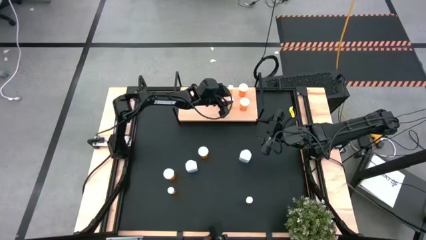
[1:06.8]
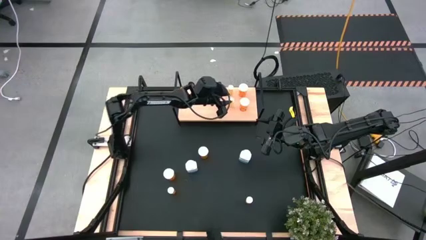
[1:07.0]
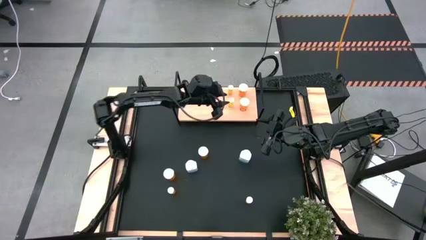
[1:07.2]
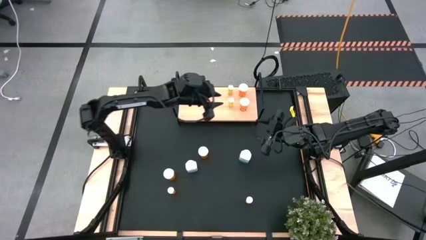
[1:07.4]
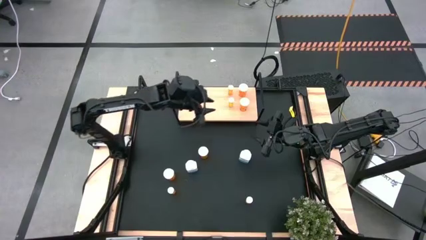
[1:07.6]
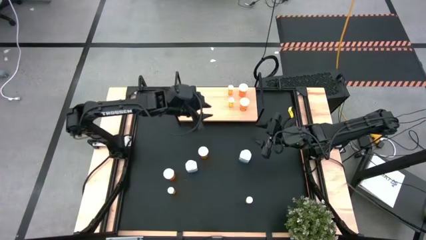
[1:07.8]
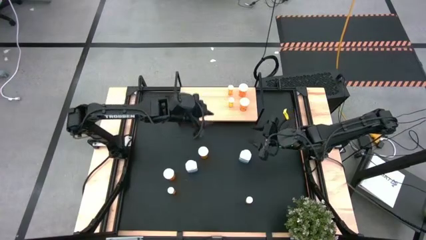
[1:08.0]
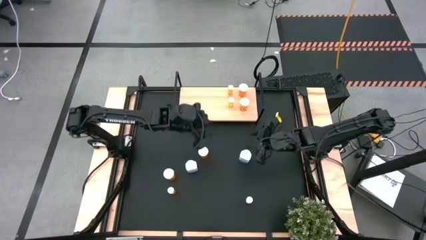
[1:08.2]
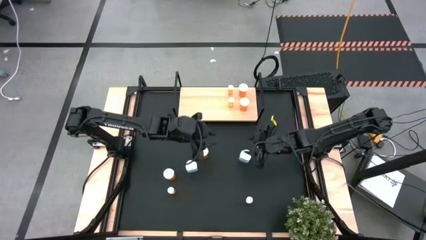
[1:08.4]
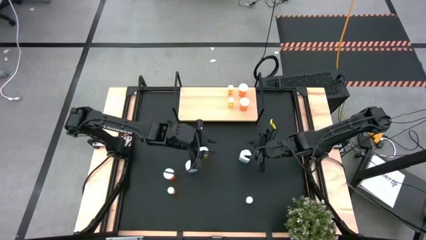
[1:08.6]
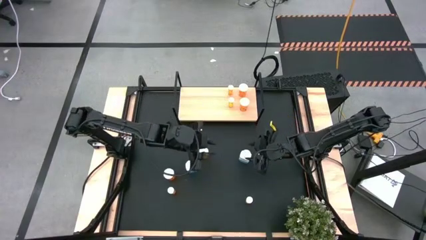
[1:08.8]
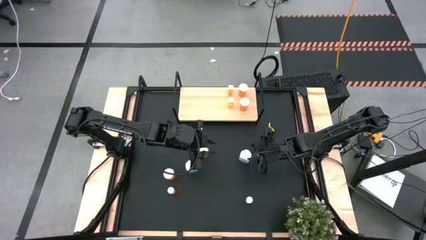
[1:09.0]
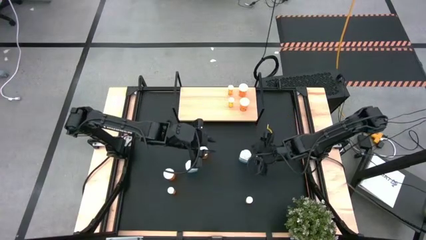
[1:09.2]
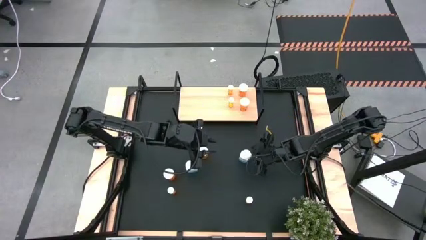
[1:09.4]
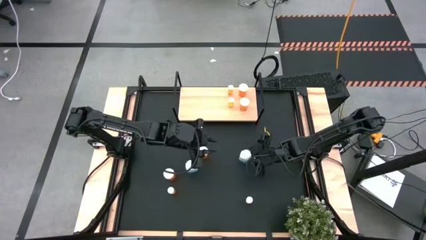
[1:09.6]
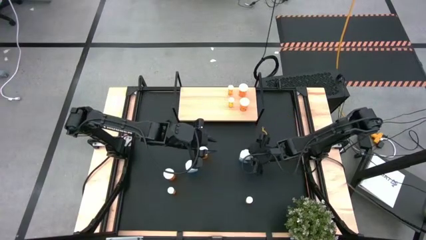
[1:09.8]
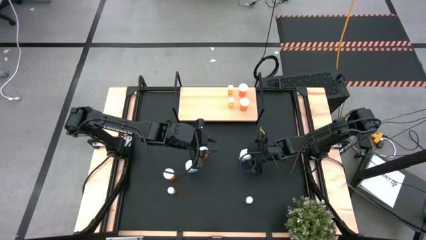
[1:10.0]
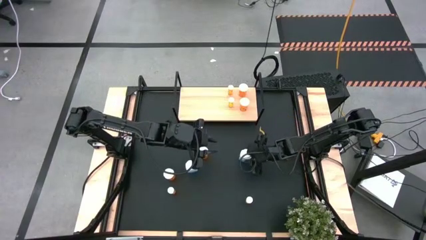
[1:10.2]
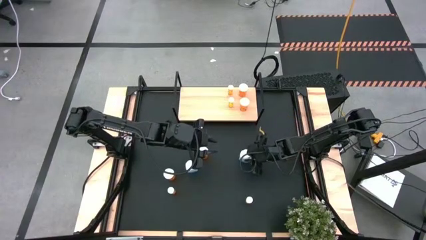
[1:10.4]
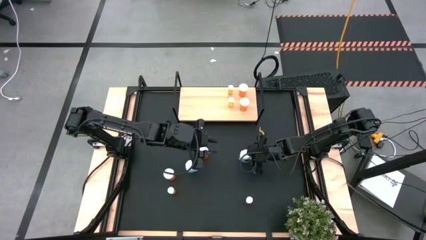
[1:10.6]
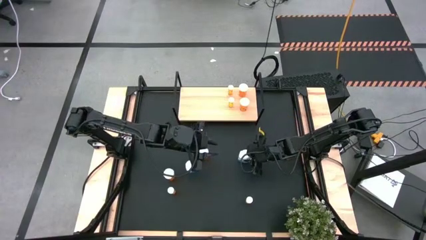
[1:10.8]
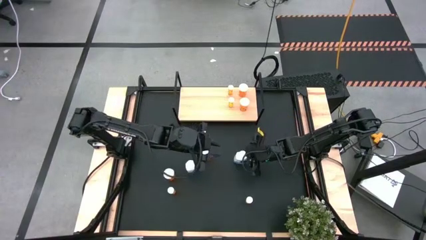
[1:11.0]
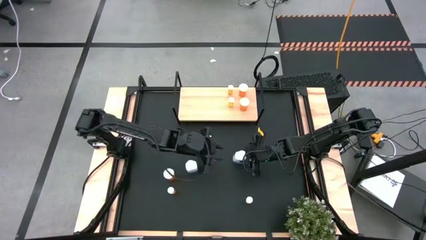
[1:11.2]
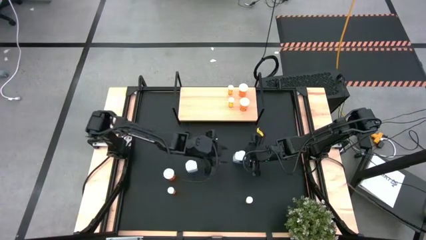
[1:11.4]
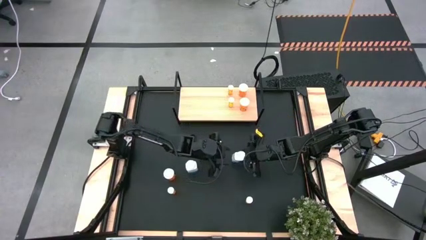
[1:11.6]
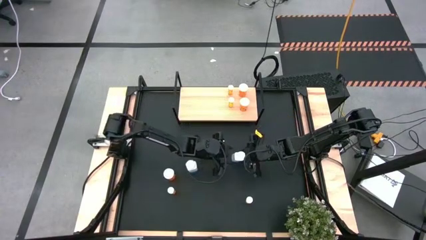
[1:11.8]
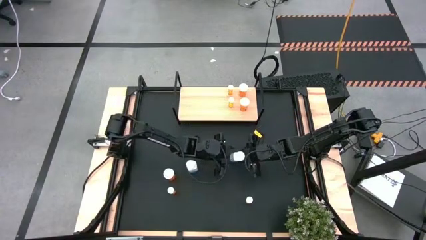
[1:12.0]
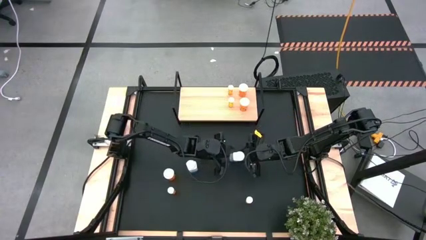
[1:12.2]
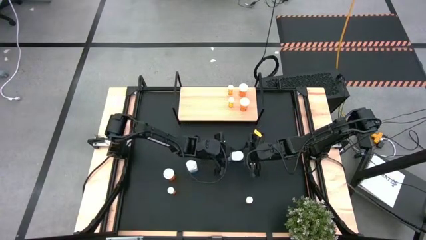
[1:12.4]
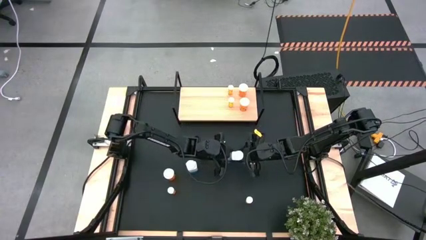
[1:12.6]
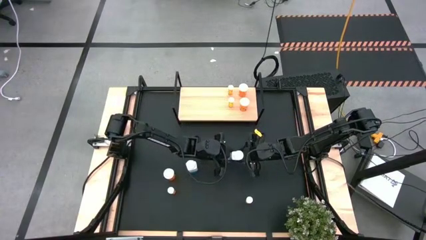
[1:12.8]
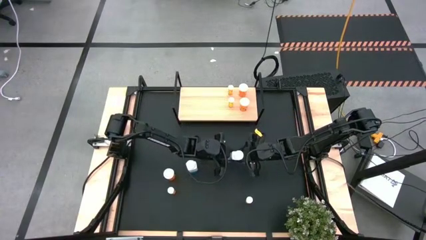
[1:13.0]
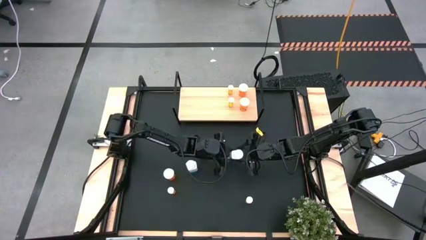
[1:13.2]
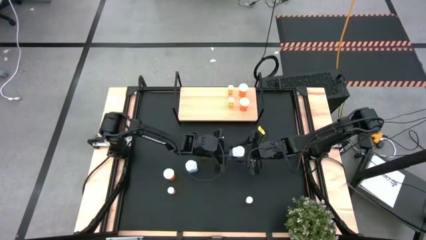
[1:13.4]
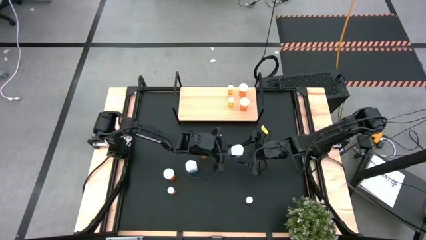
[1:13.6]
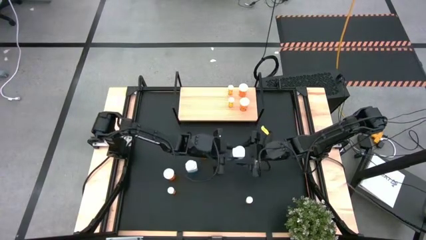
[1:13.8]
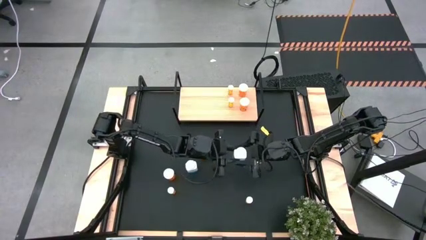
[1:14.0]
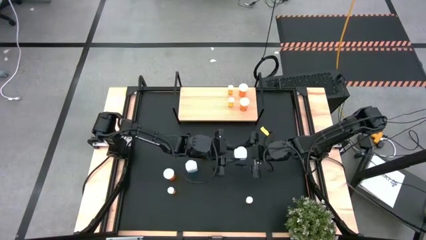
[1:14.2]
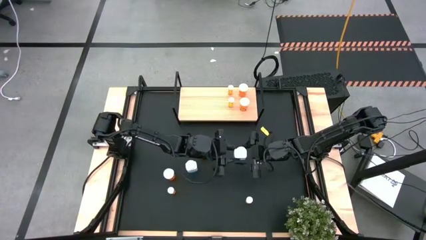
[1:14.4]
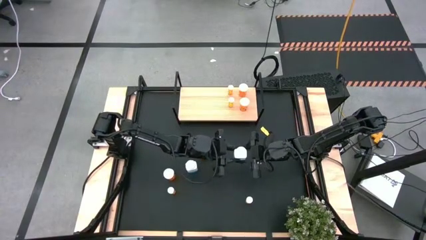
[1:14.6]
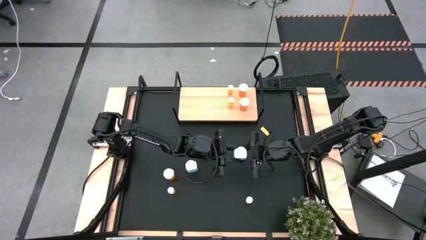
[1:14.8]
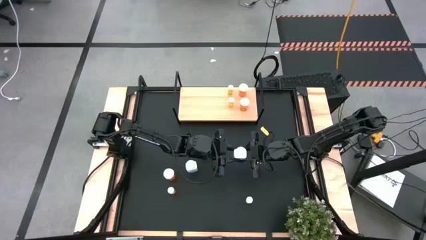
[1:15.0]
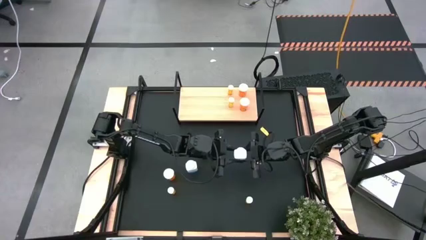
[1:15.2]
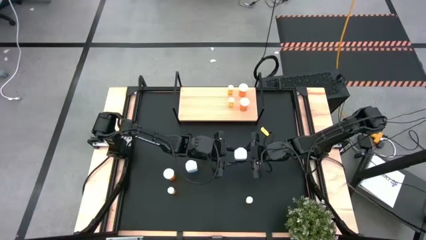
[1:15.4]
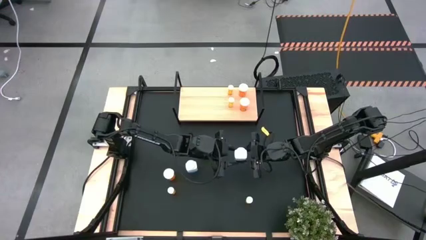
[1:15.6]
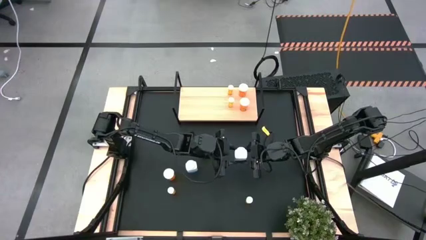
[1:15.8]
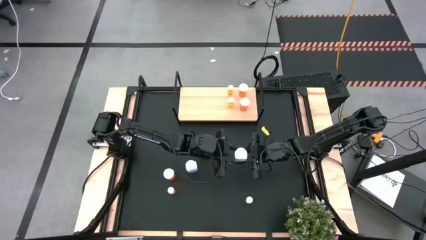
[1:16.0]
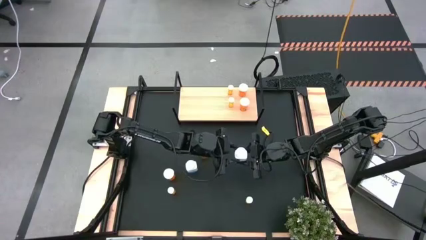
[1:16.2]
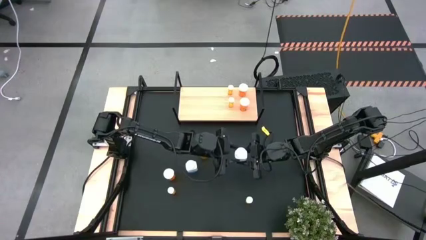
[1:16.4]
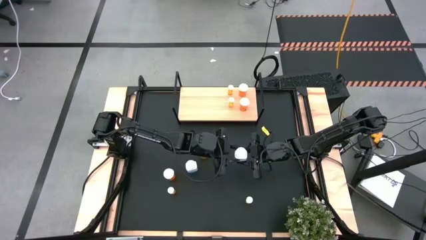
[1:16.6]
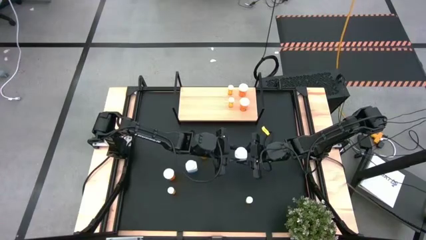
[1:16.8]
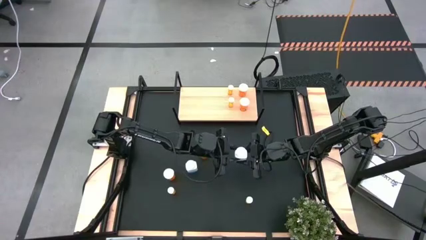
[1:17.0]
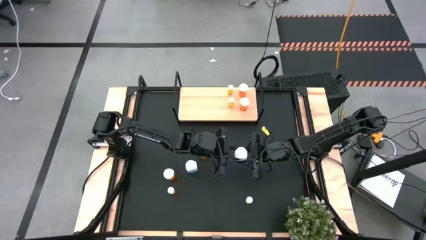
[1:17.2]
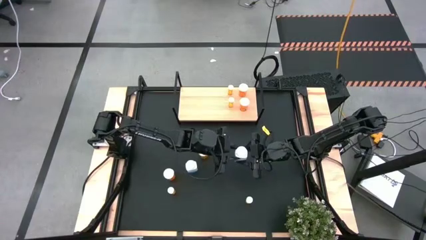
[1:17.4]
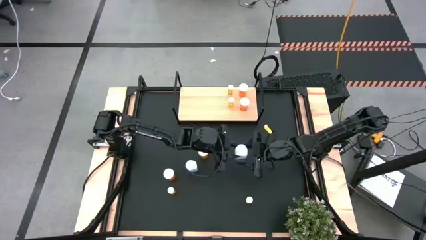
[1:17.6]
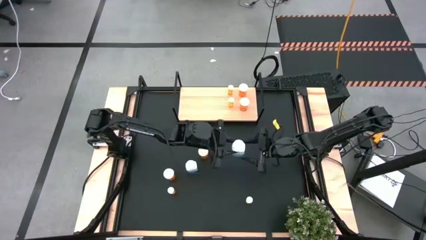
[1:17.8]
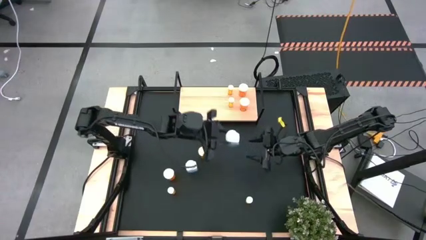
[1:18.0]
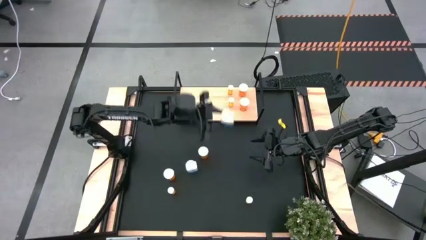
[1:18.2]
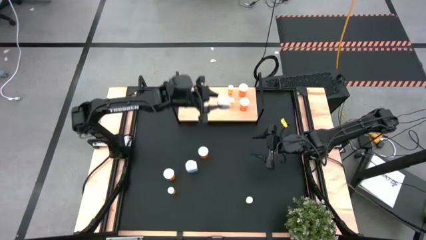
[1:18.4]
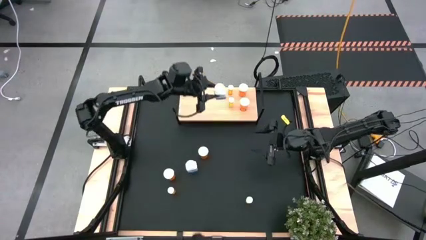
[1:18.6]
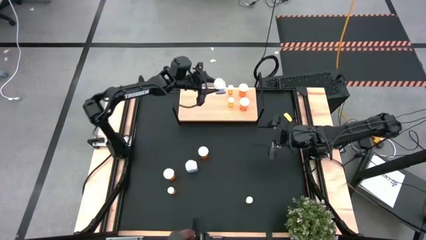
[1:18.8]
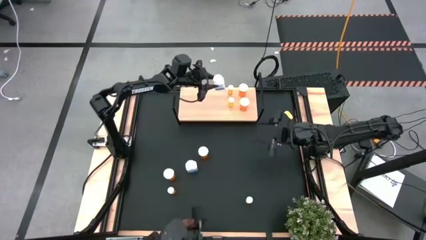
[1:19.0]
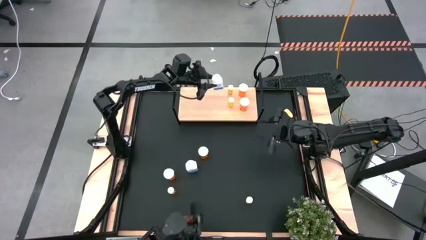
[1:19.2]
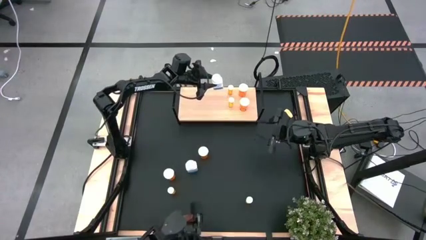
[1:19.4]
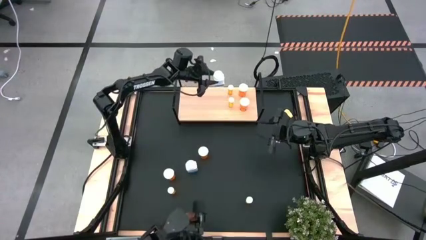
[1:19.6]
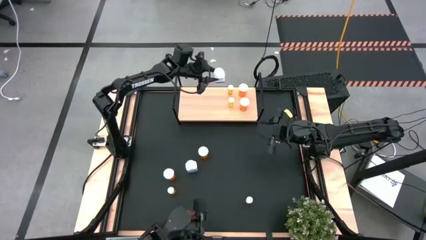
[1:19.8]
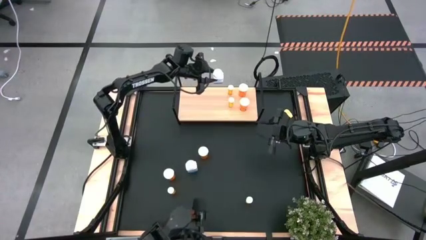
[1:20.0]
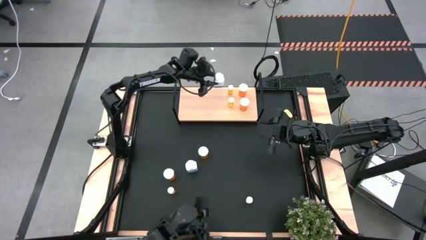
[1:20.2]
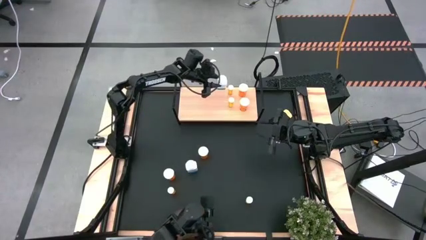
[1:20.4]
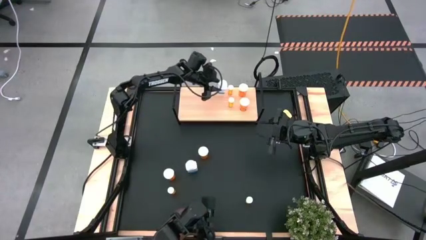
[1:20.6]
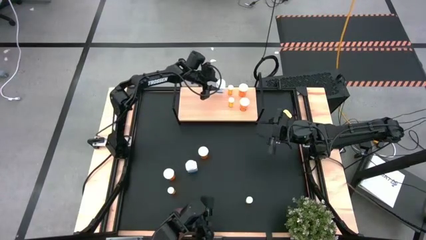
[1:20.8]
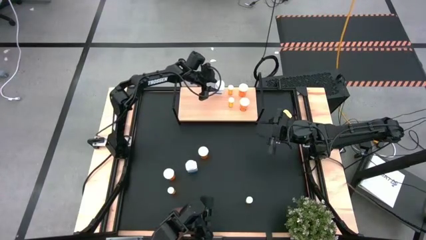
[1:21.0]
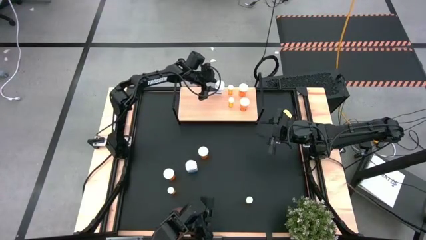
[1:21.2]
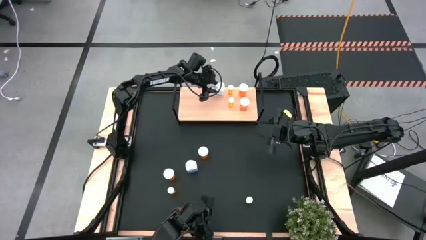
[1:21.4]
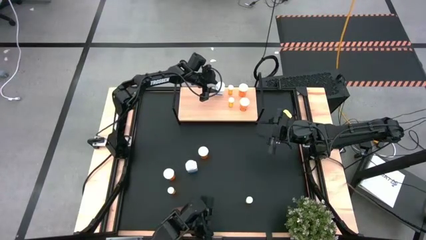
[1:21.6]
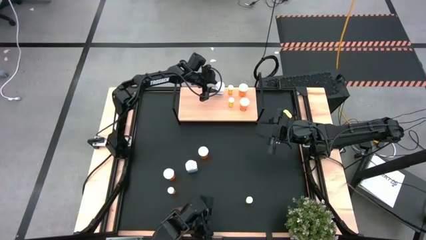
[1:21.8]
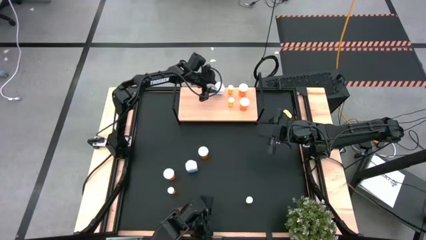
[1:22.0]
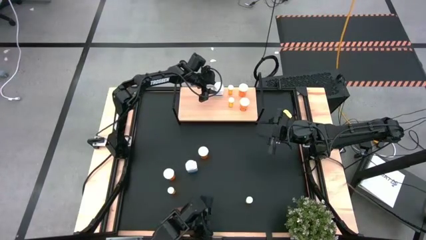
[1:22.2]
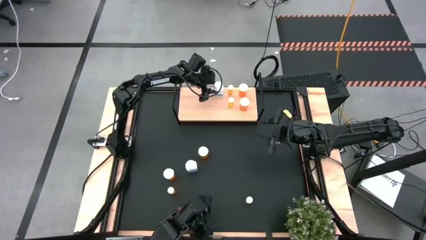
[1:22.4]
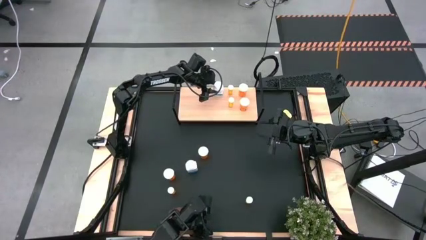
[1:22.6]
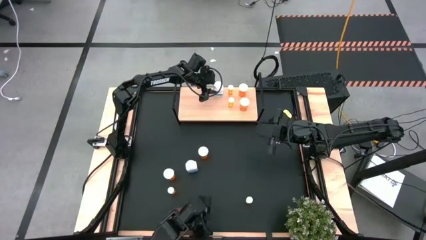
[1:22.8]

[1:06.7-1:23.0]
Task: Pick and place medicine bottles onto shelf by color
Put the right white pill bottle on the shelf
